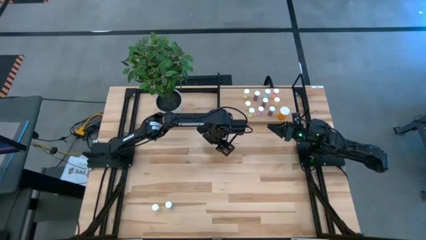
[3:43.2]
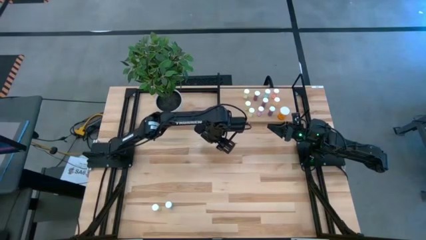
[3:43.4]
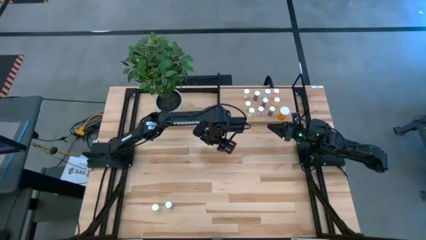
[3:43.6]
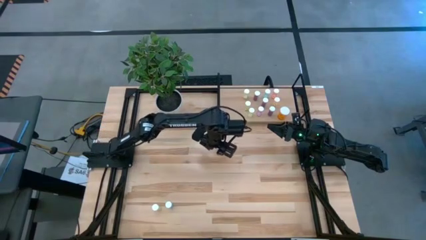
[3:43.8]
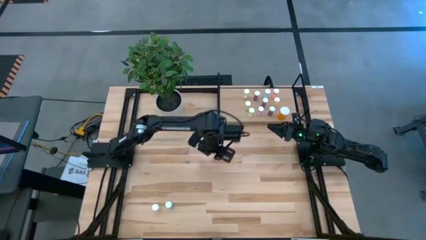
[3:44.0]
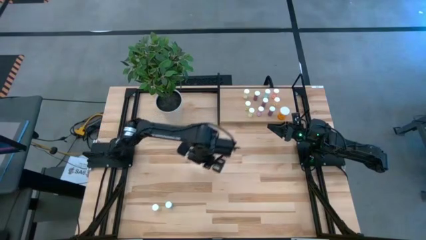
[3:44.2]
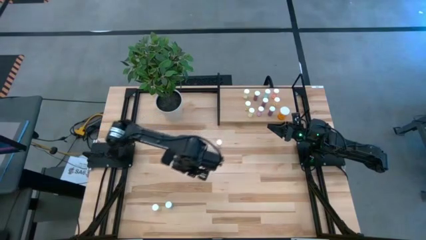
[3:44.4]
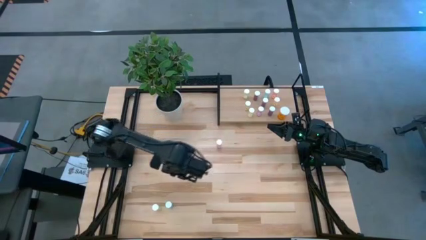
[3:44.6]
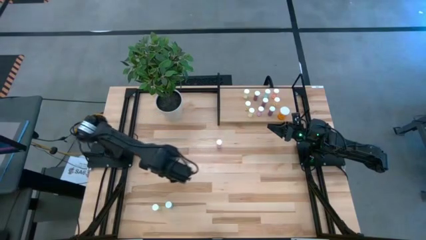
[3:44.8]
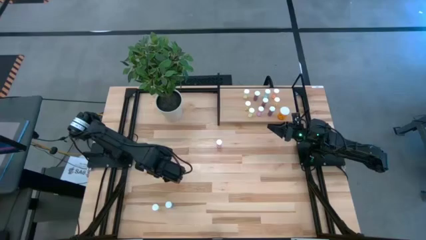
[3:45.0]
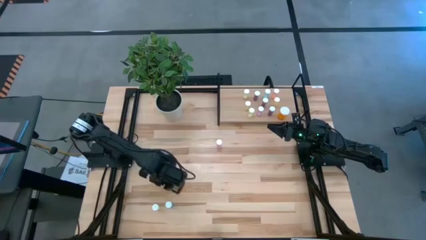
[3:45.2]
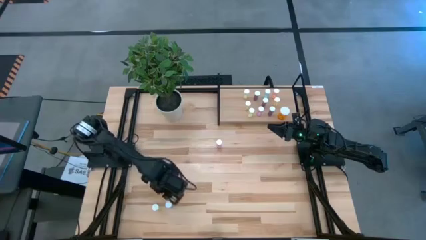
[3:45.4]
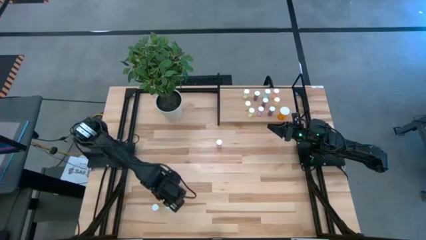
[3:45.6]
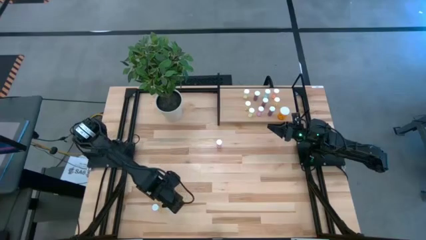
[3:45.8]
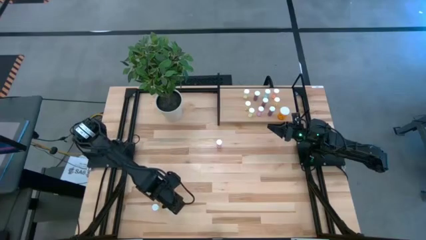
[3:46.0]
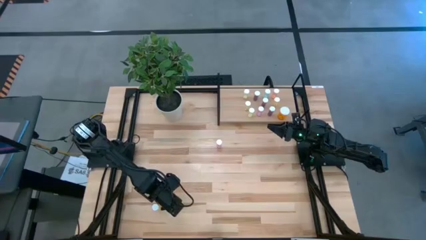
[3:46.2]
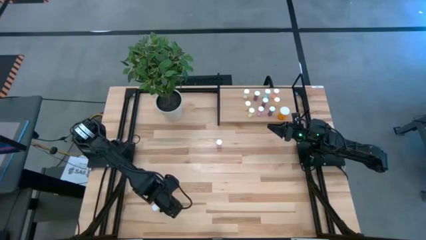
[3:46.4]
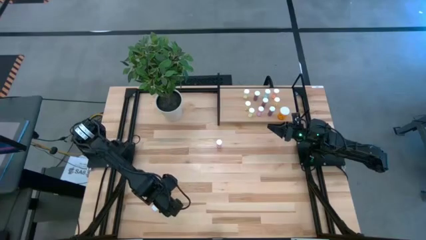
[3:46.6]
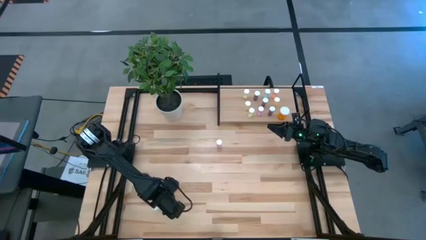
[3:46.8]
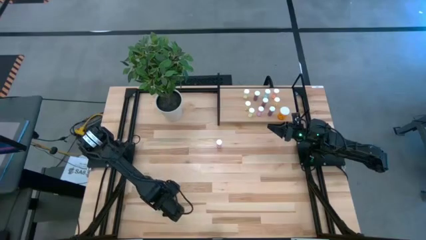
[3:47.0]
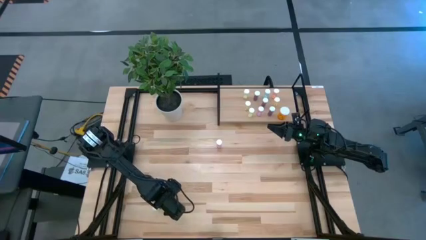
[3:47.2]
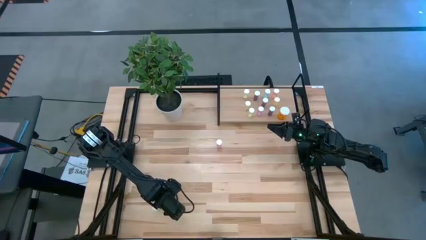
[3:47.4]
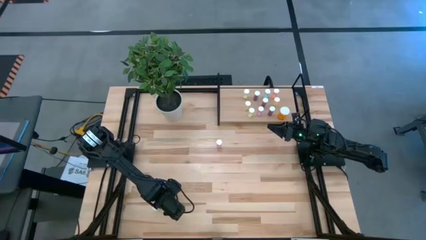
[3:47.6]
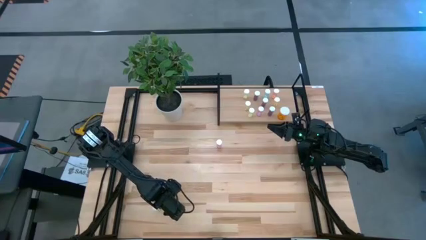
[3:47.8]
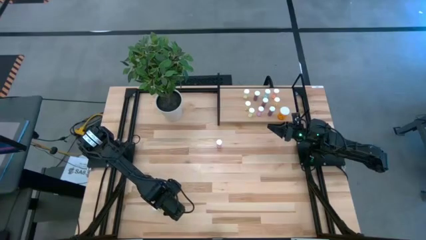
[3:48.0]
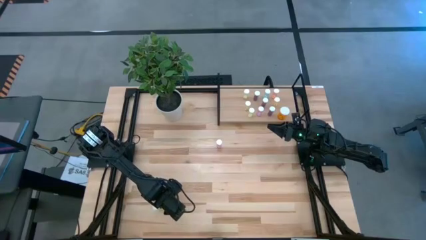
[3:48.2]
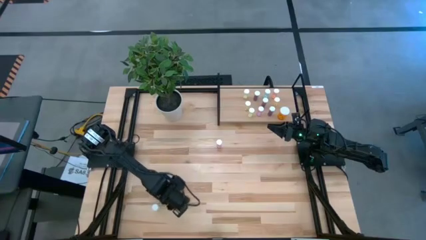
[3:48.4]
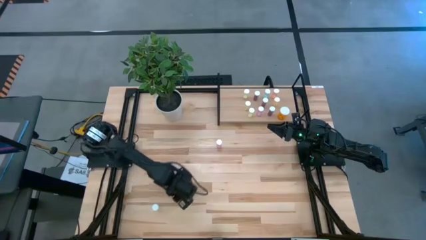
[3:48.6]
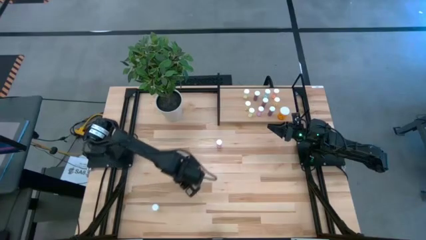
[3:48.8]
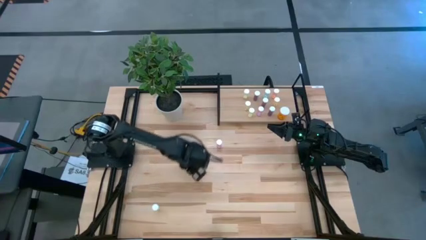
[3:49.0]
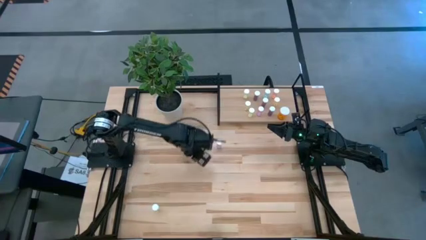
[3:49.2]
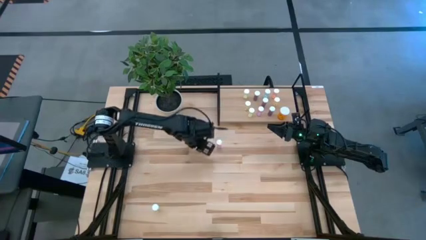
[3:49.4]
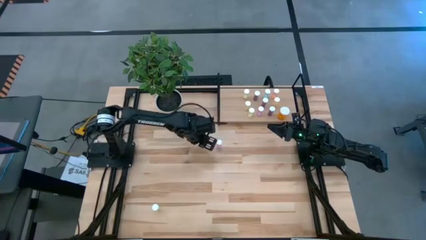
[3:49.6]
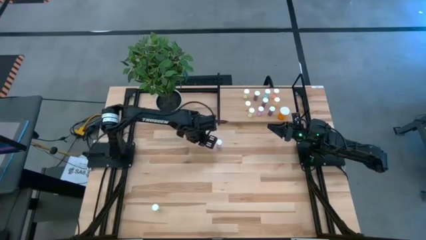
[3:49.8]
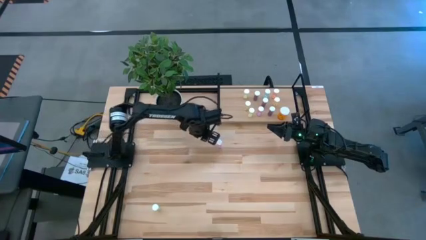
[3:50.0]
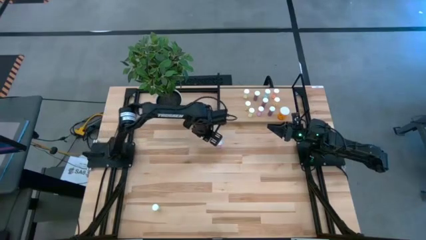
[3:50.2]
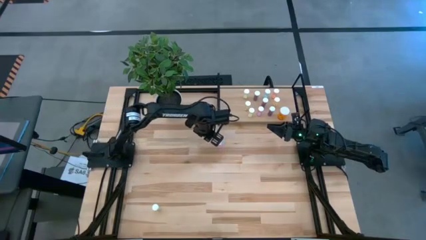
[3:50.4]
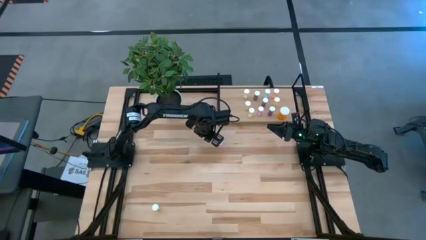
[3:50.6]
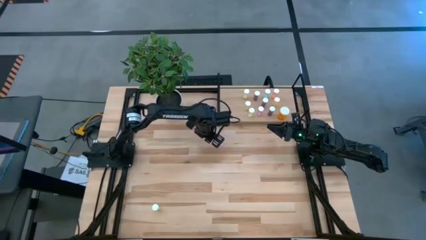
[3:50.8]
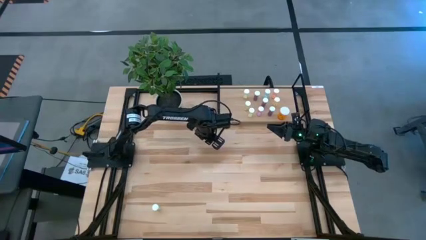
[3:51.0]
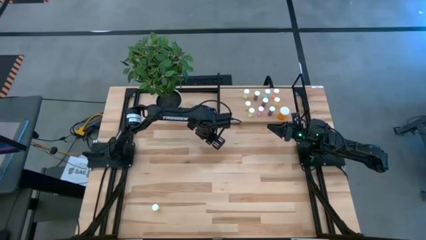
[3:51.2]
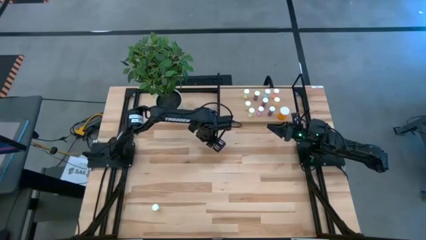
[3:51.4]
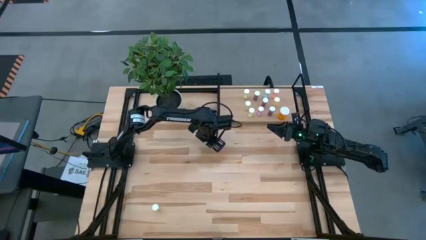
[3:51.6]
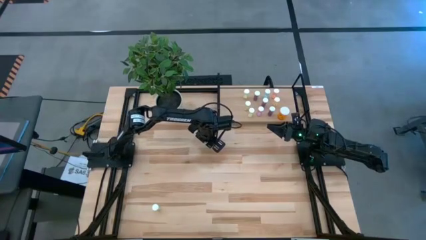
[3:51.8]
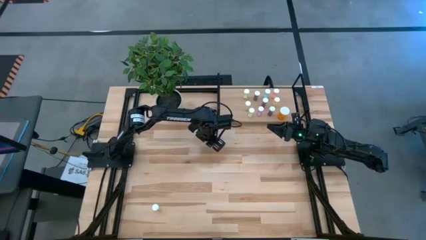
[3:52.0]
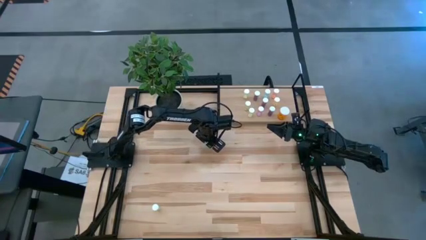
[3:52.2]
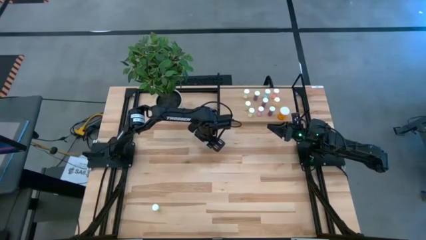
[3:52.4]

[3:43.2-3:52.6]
Task: Pick and place medicine bottles onto shelf by color
Move the blue pill bottle to the center of the table

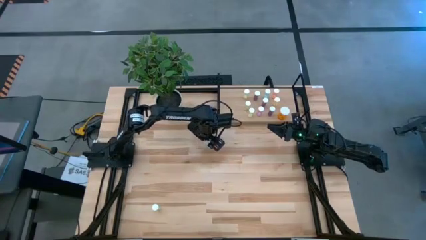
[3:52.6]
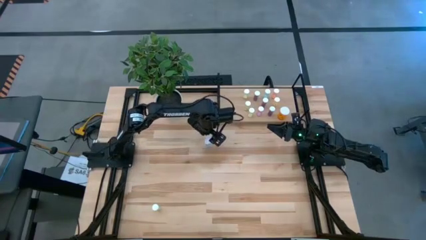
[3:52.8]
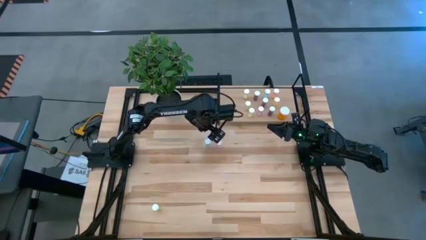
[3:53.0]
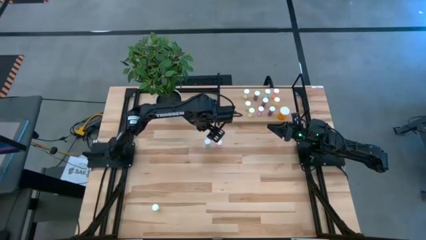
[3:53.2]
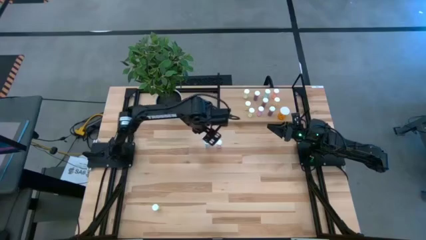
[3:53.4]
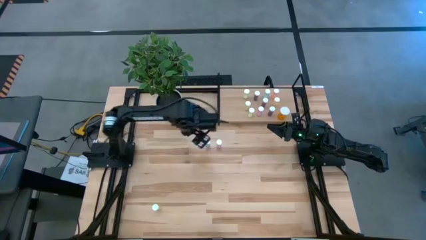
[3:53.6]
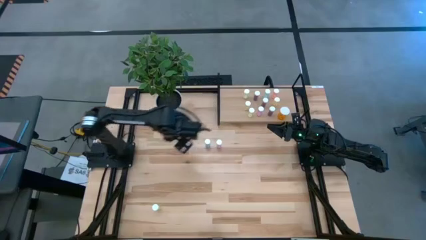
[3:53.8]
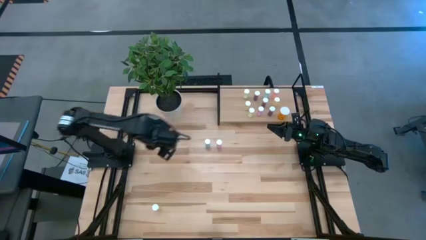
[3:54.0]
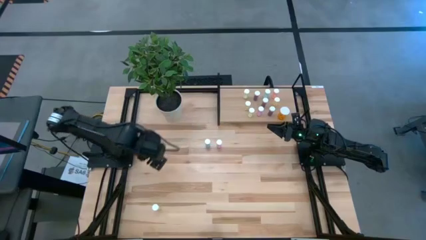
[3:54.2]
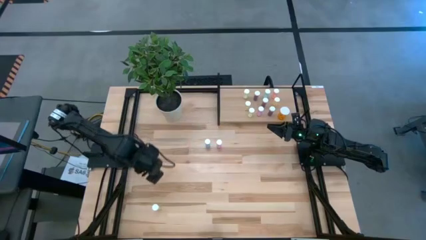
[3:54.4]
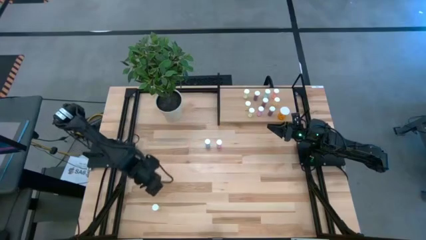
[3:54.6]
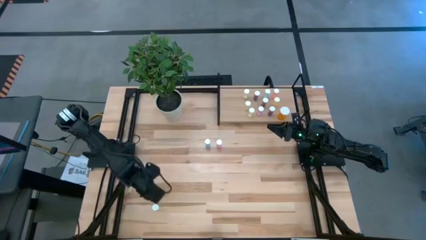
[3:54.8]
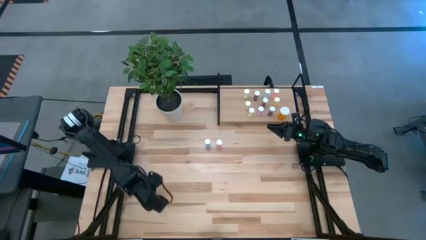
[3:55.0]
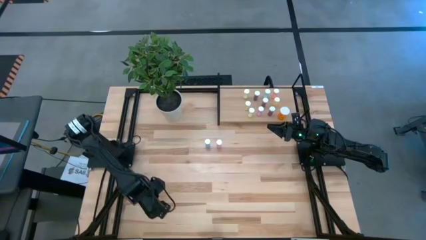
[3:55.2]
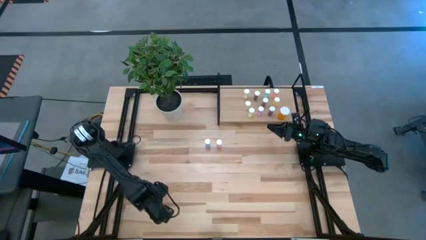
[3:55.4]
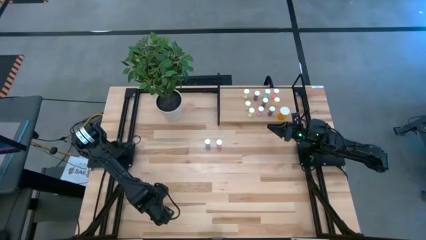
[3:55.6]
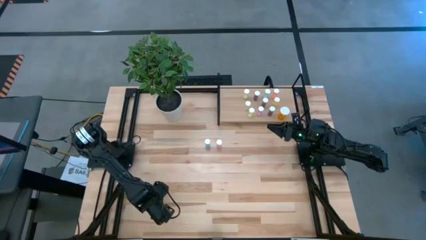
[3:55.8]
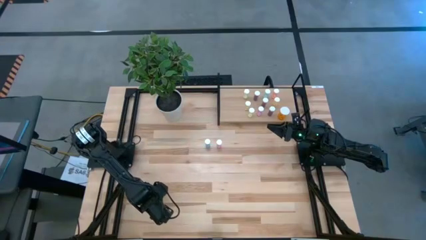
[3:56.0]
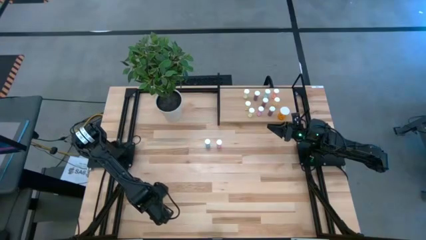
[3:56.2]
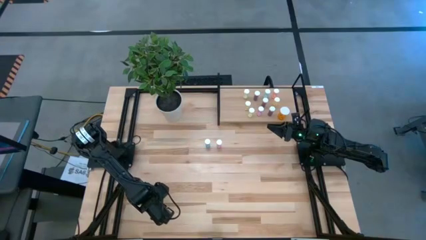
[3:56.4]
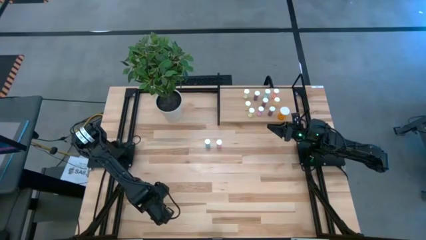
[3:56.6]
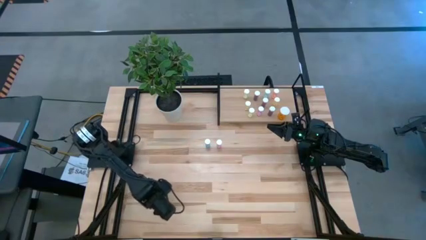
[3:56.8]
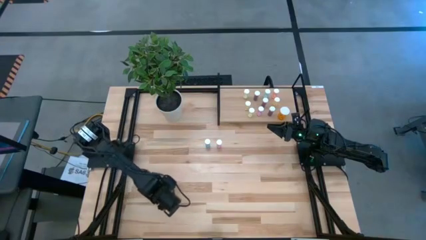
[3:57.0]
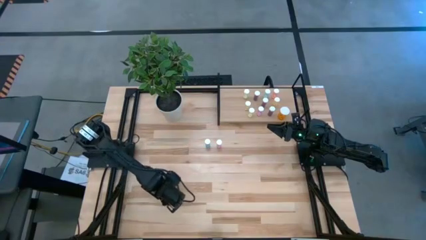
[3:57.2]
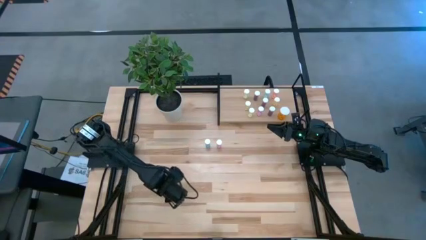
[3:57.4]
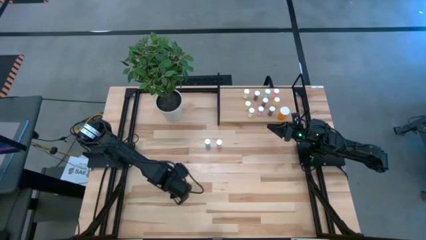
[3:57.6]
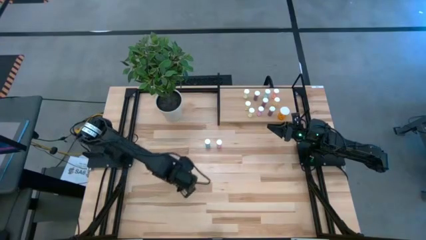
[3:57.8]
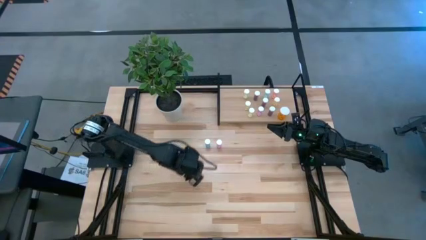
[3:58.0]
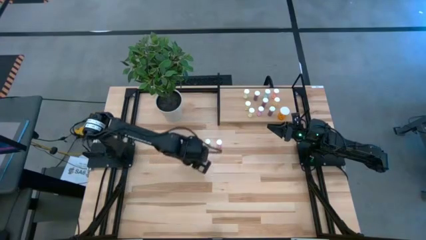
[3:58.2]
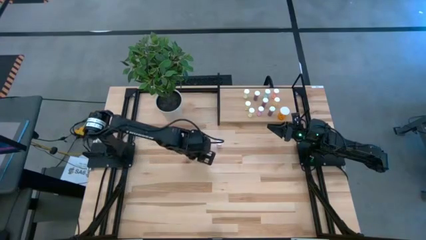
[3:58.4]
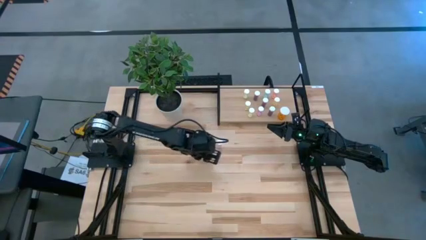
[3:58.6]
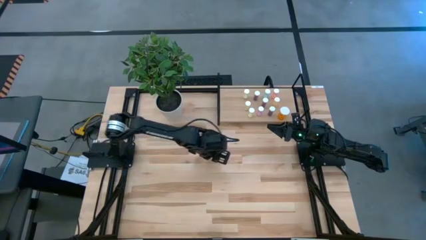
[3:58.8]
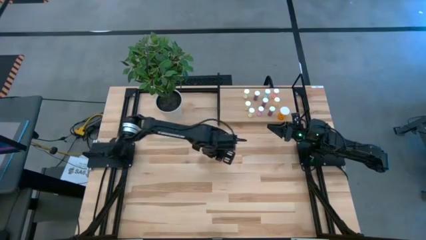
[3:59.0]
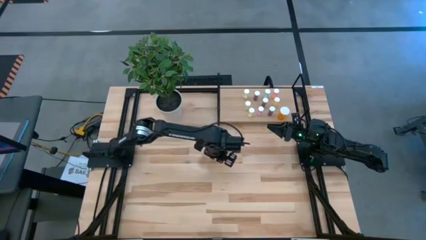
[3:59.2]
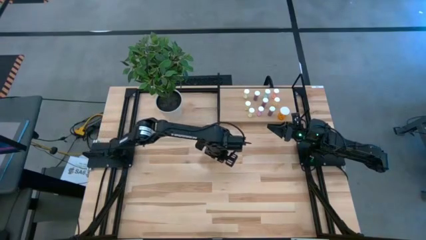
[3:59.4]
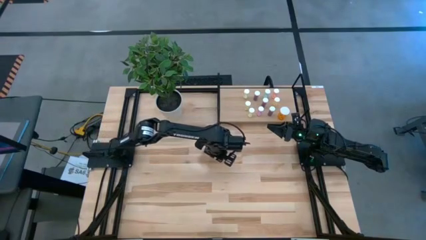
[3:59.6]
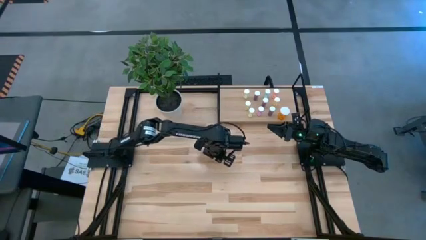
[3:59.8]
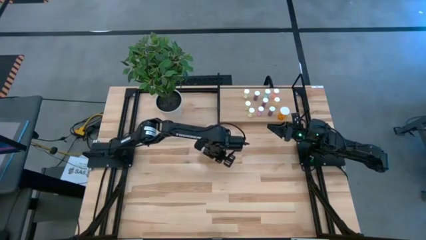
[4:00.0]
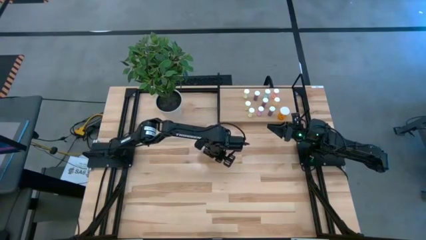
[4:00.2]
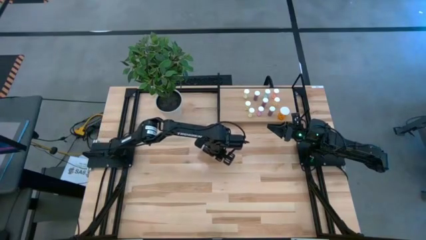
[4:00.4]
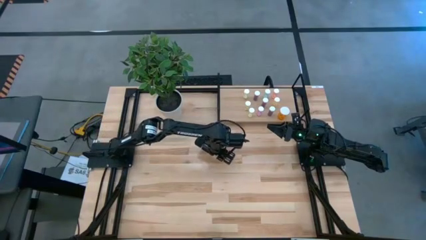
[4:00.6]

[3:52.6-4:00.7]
Move the yellow pill bottle to the center of the table
